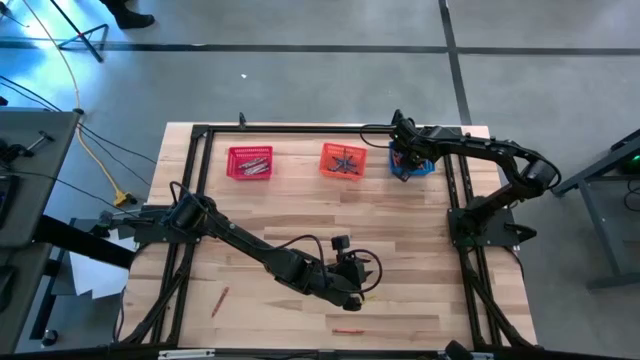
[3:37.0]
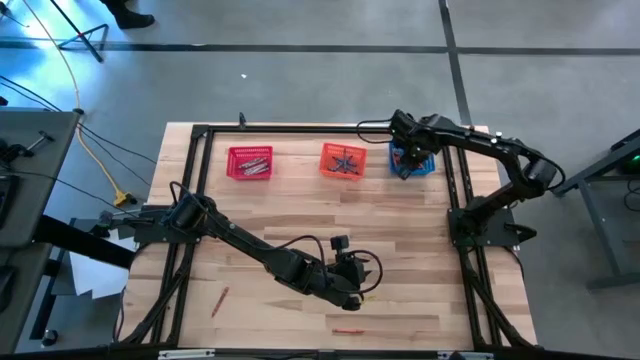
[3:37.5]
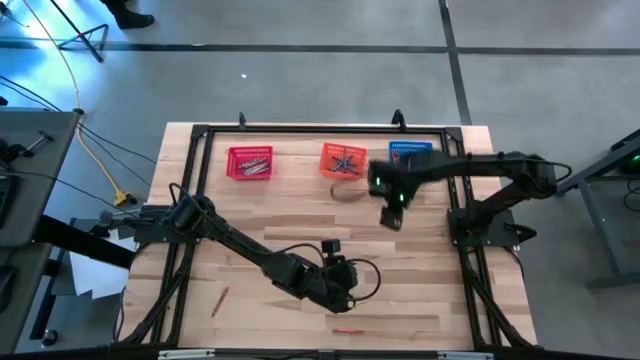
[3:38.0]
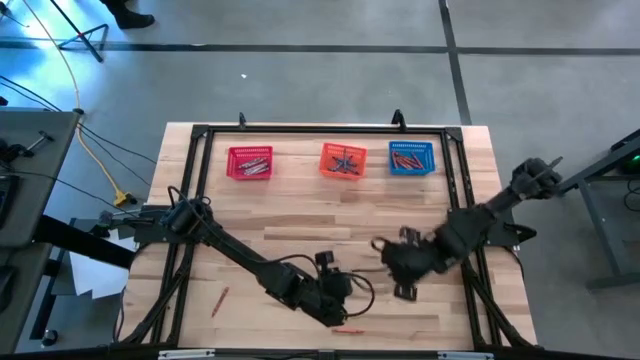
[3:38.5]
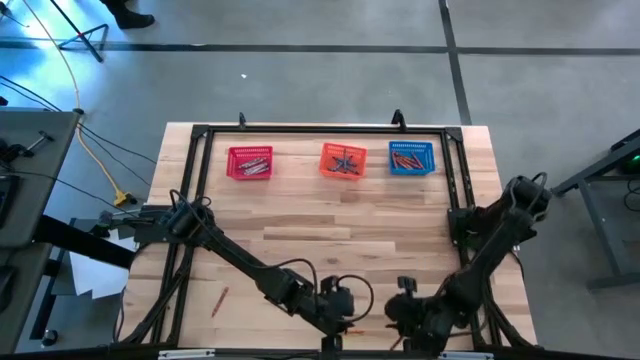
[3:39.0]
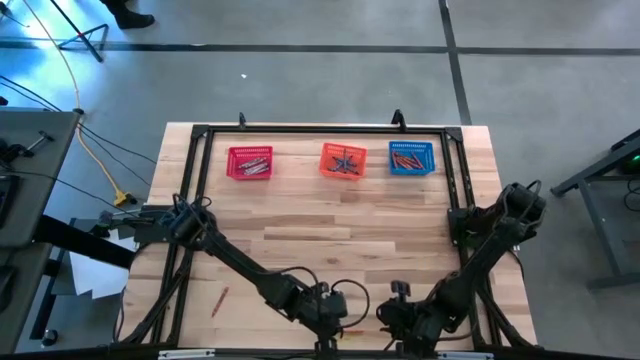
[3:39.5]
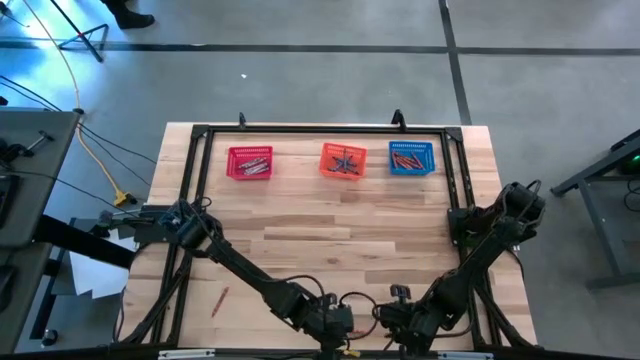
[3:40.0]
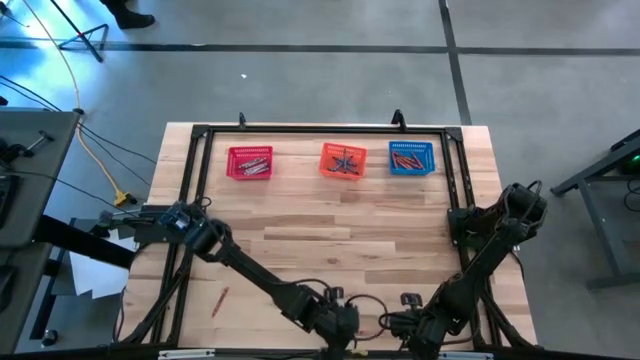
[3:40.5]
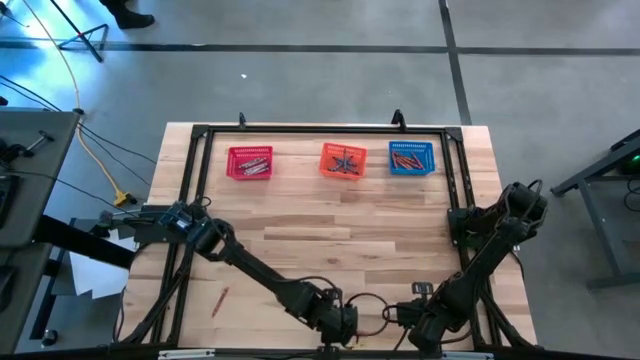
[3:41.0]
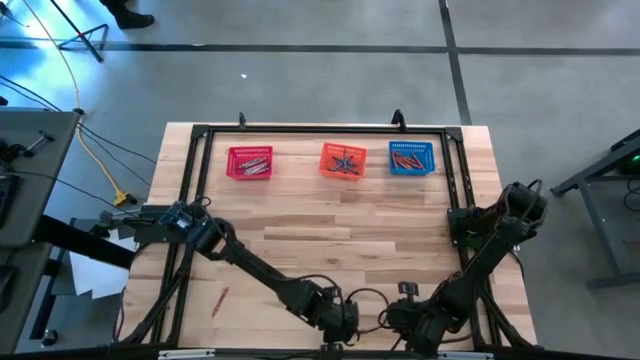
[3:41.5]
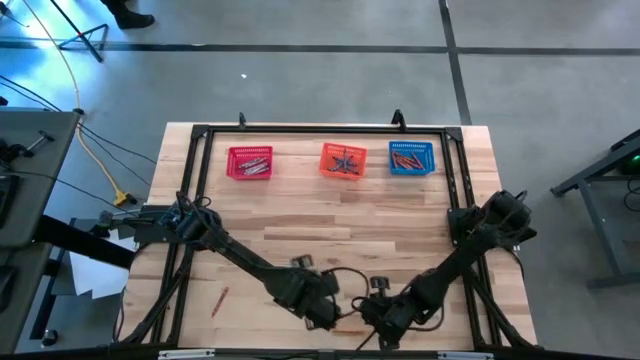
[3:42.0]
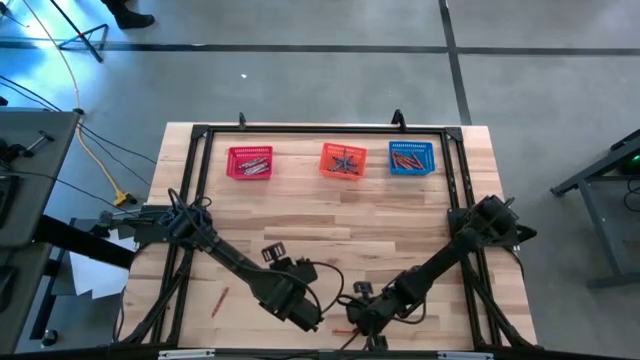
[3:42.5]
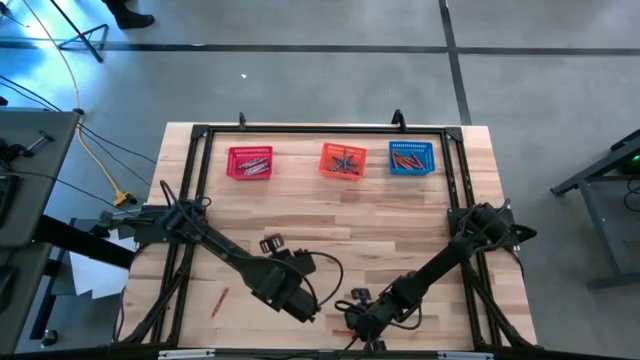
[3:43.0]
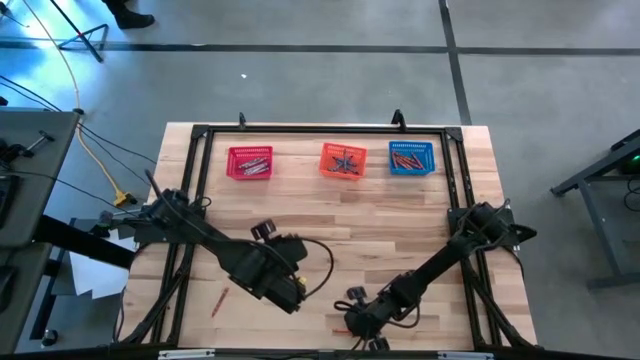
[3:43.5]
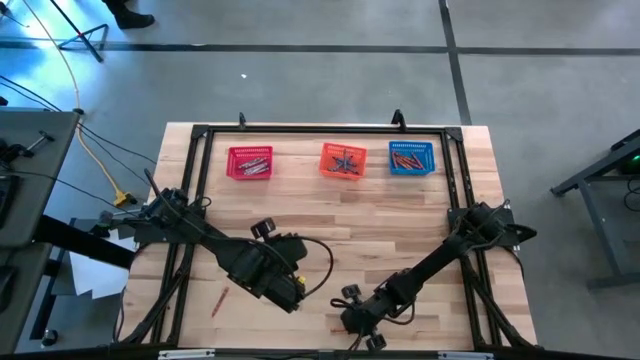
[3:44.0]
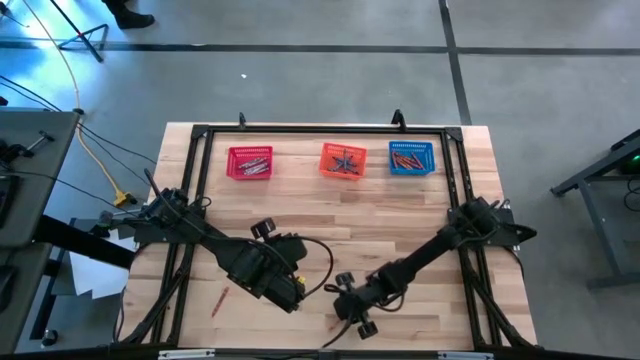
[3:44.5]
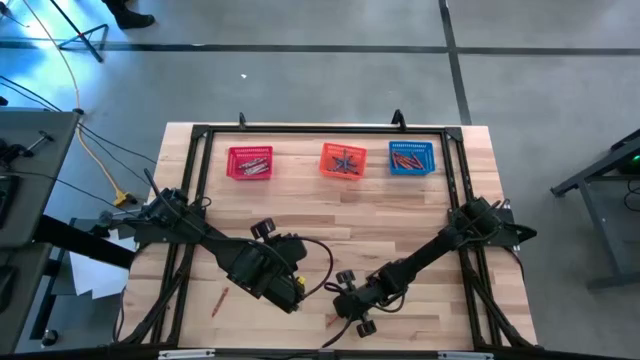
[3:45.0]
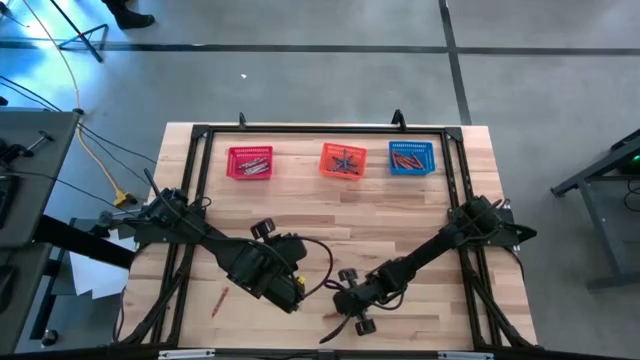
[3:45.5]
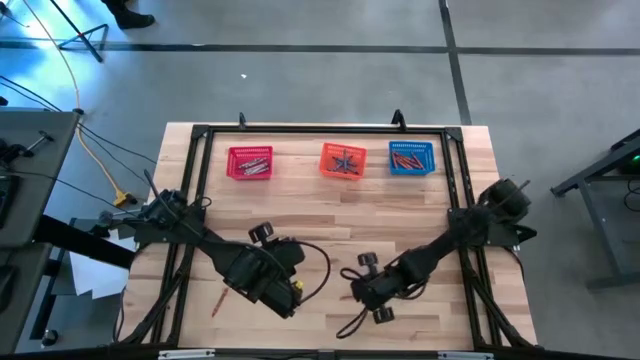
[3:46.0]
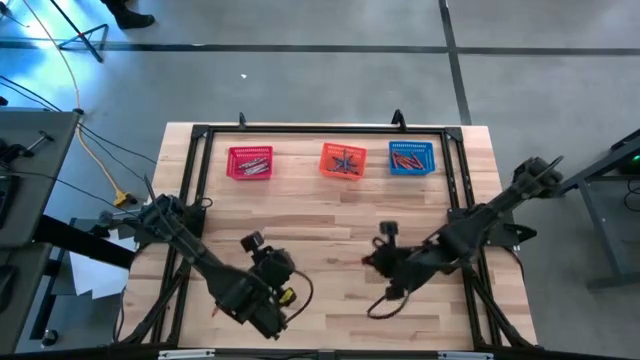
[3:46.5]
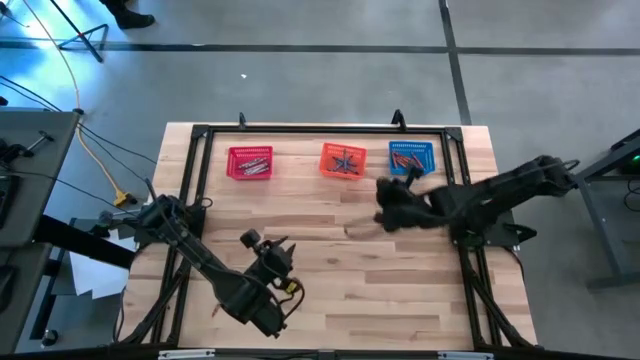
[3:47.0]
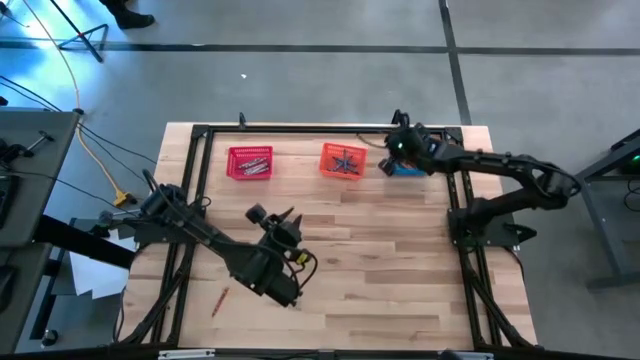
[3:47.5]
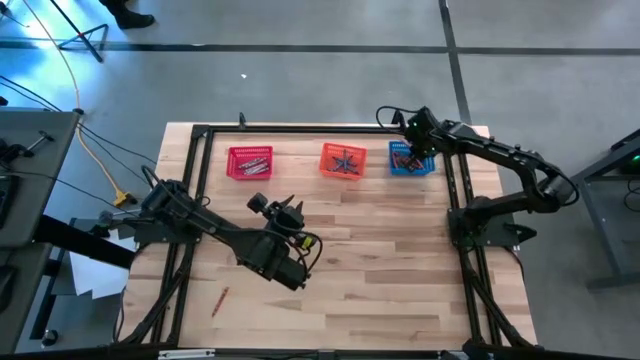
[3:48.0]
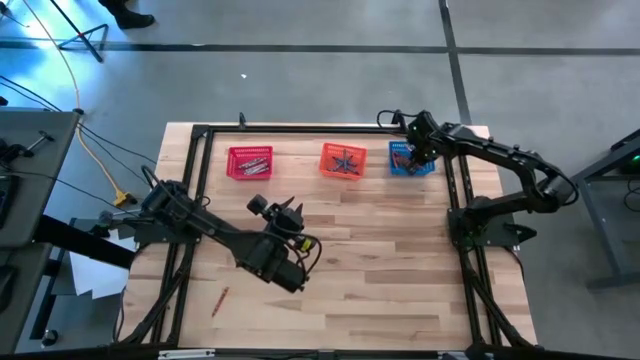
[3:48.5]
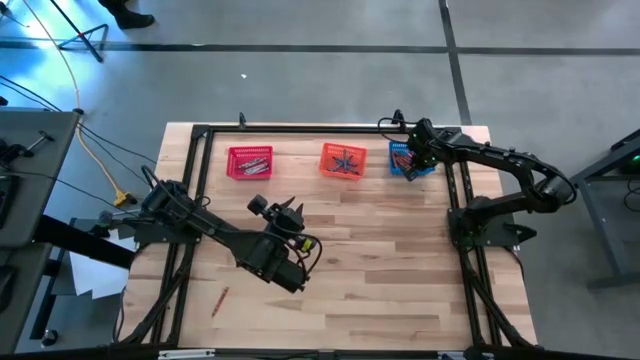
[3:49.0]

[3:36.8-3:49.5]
Task: Sort crayons
Put the orange crayon into the blue bin

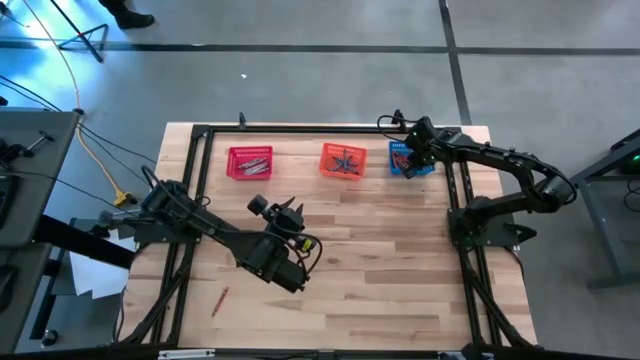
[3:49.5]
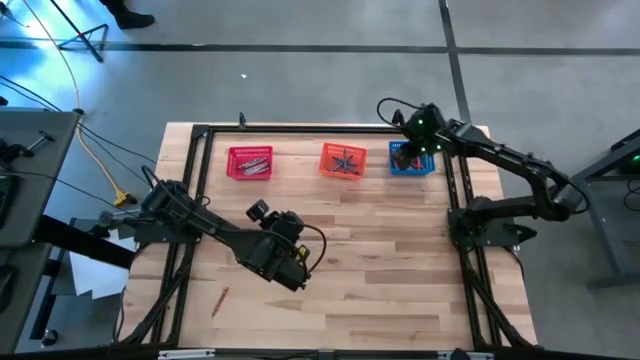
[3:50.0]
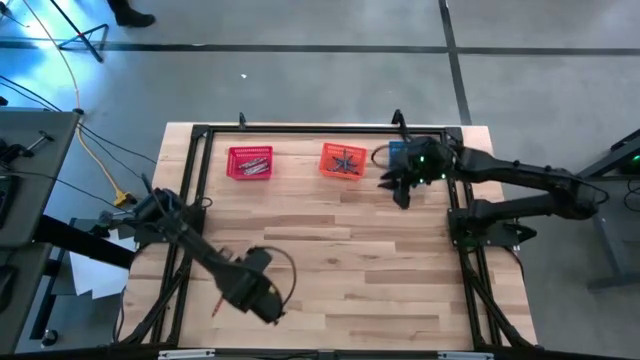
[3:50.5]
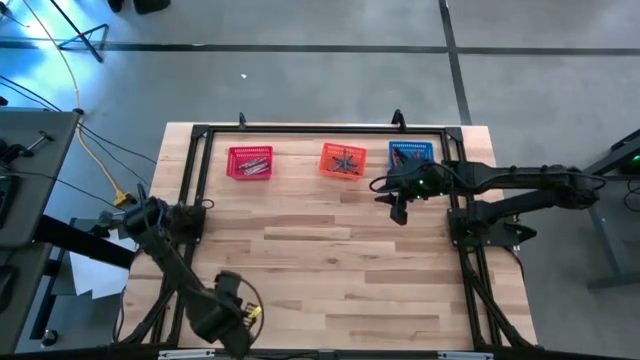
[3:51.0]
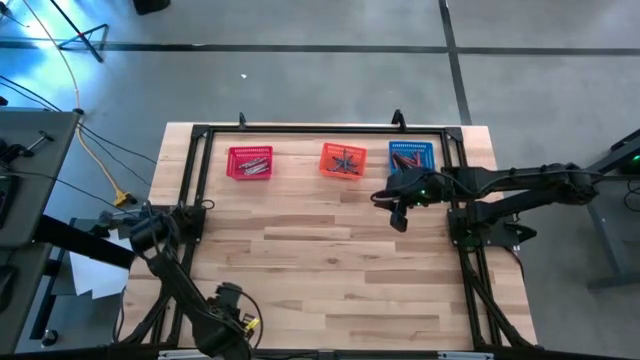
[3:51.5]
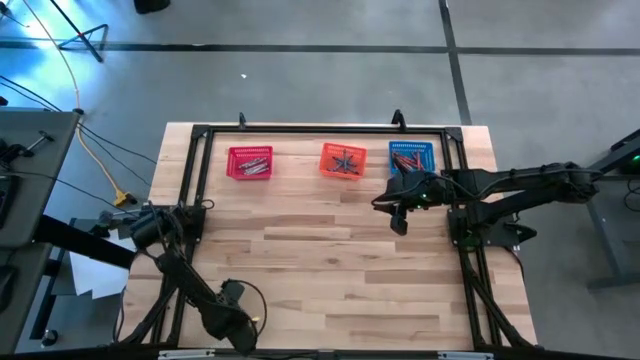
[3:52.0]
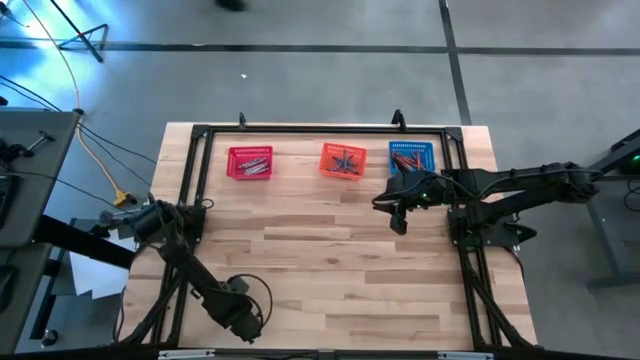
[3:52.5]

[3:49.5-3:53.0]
Put the orange crayon into the blue bin

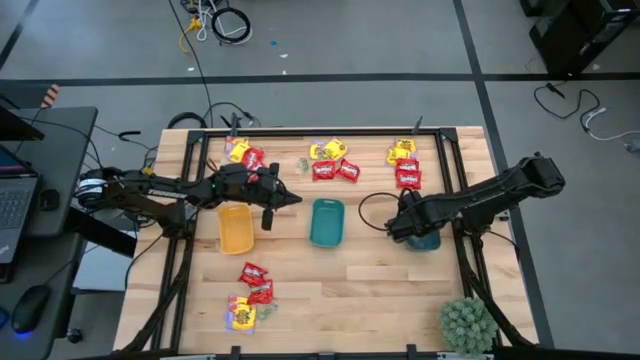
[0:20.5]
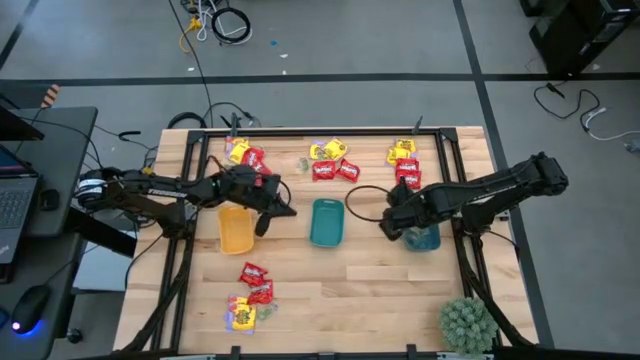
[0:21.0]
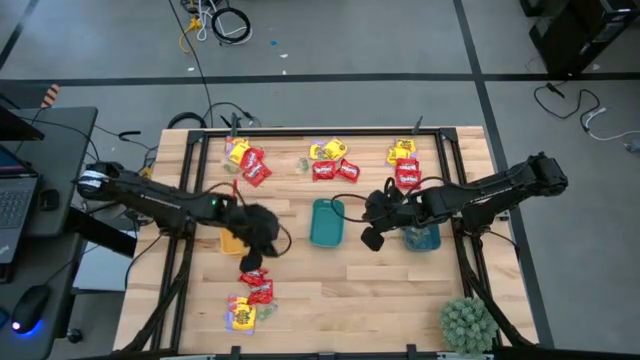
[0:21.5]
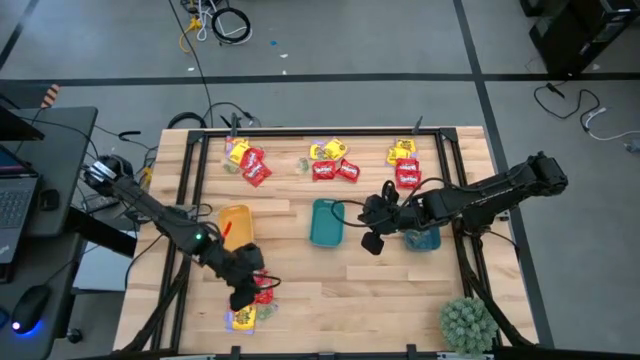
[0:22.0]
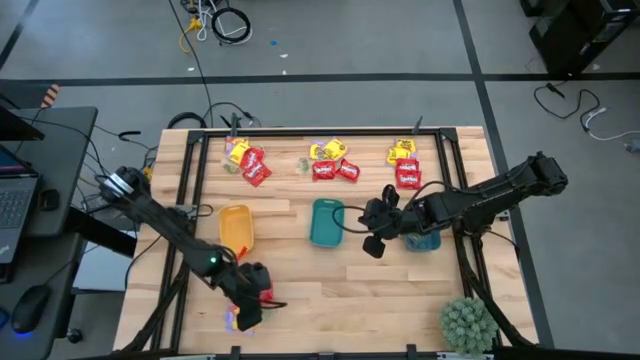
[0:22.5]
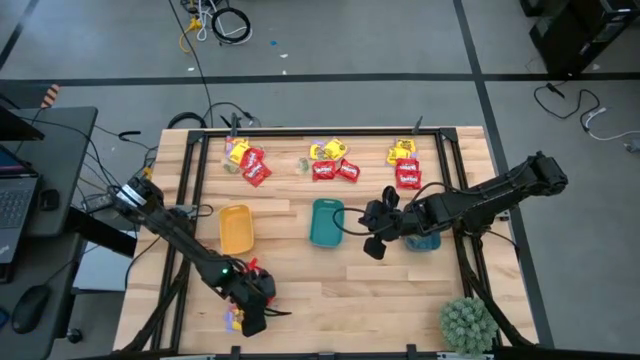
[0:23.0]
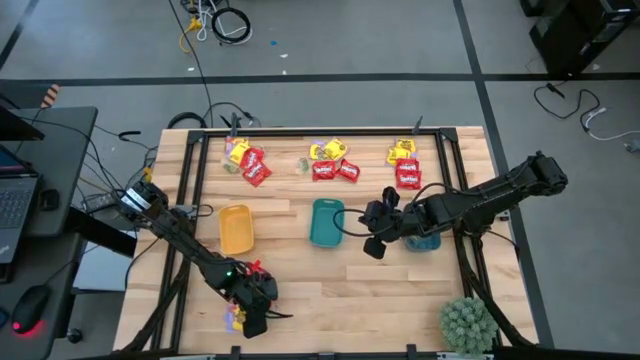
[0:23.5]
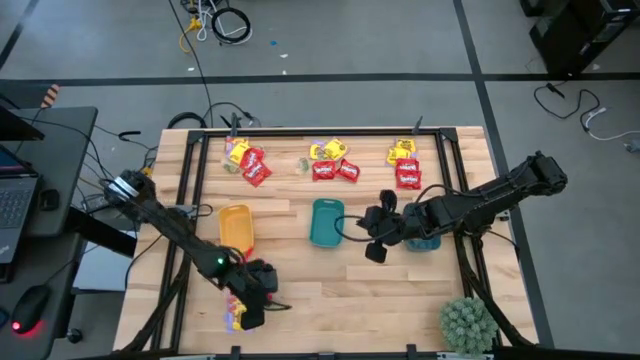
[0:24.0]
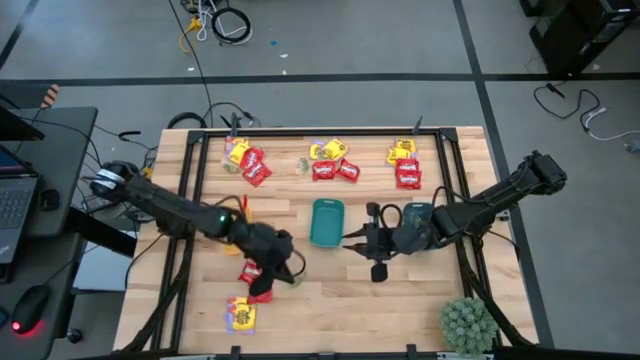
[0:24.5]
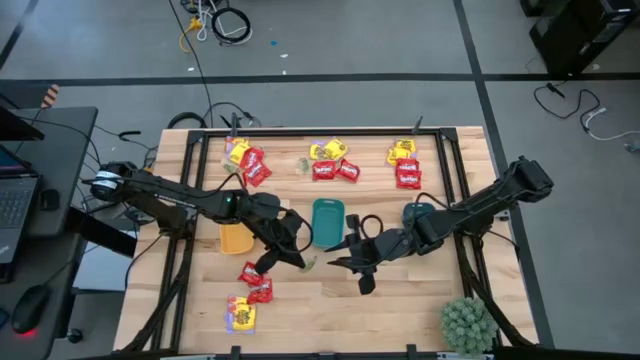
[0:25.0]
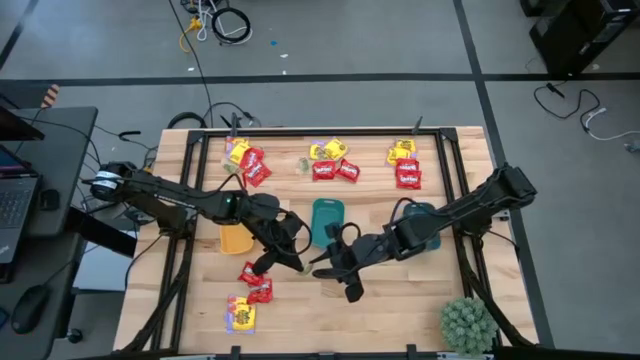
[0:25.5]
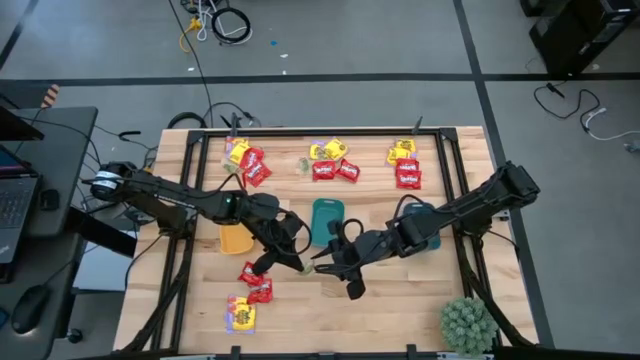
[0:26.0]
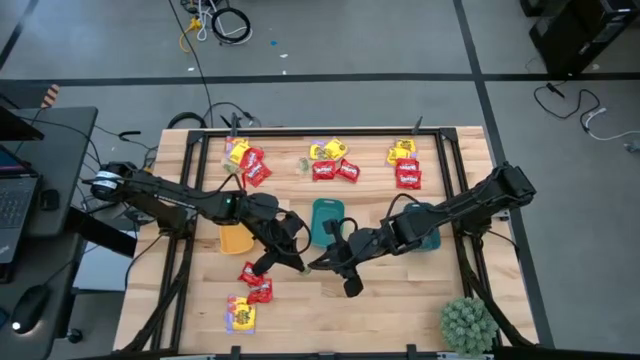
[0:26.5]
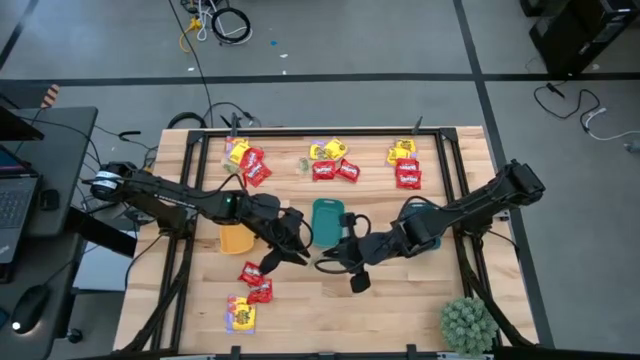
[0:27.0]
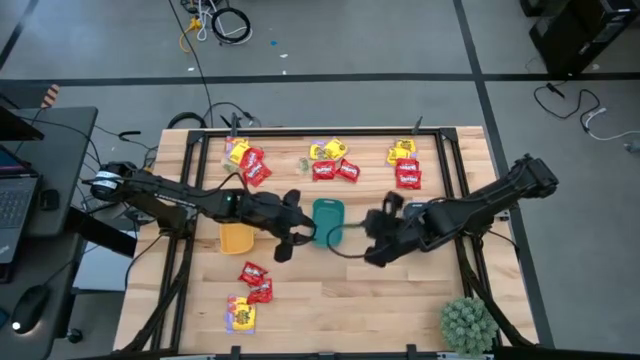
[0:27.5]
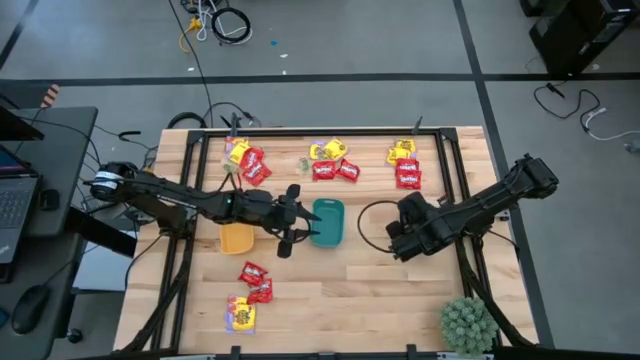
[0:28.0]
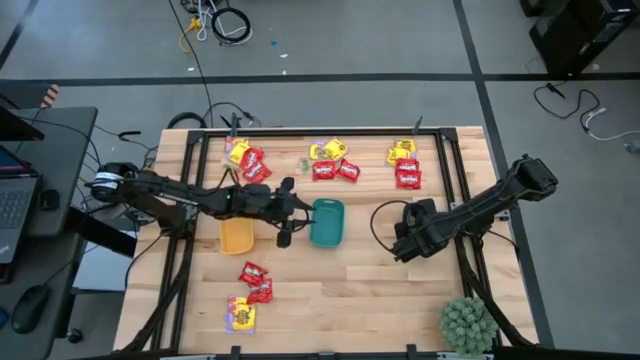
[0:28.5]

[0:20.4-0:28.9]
Task: Sort candy
Put the green transparent candy into the blue bin
